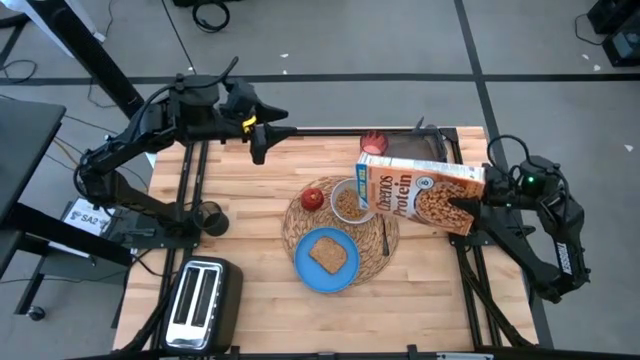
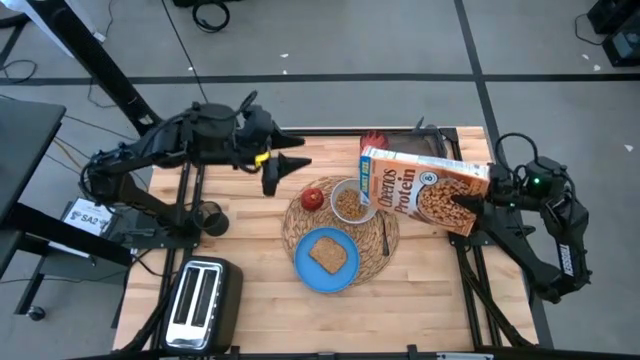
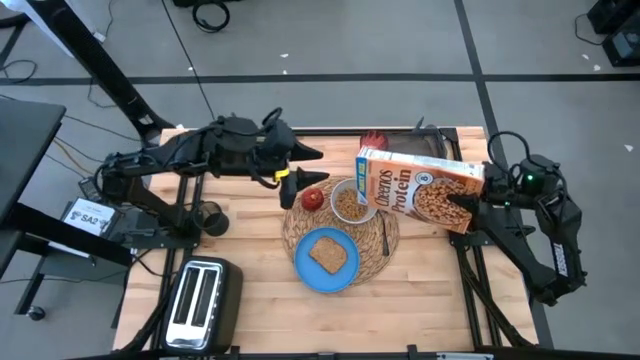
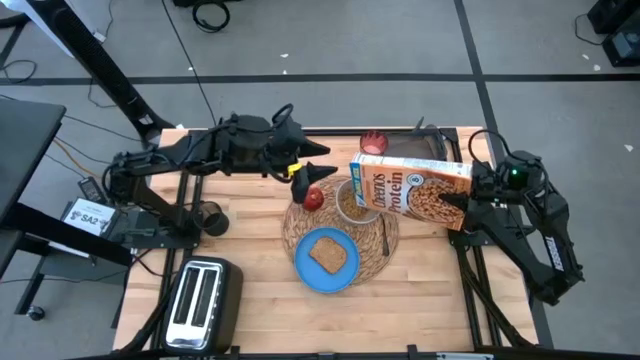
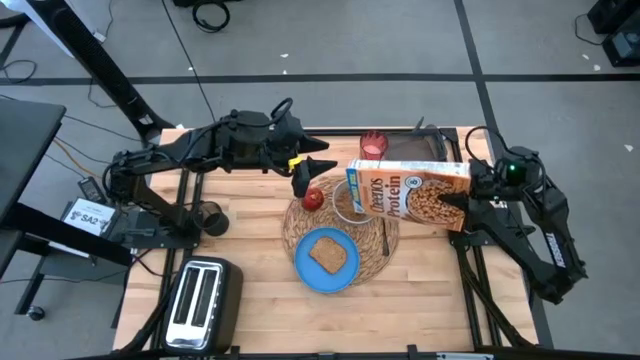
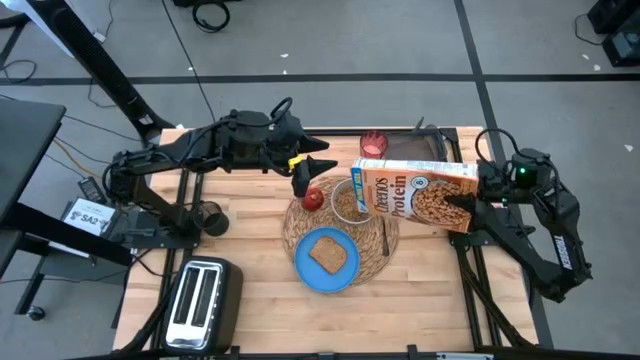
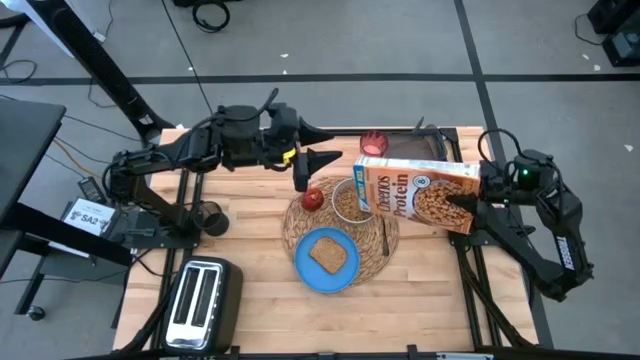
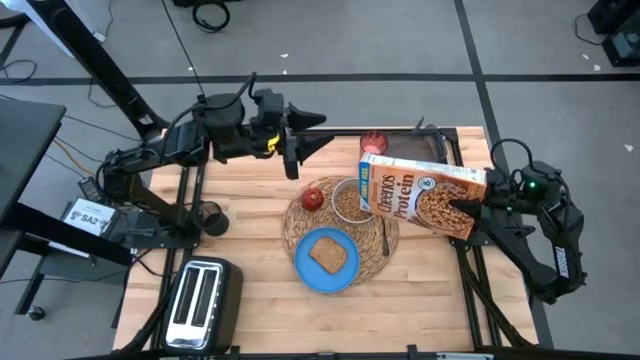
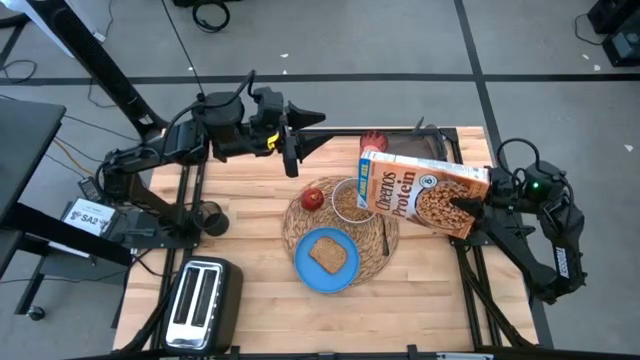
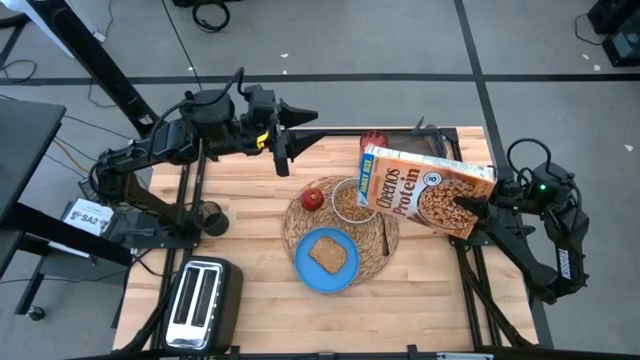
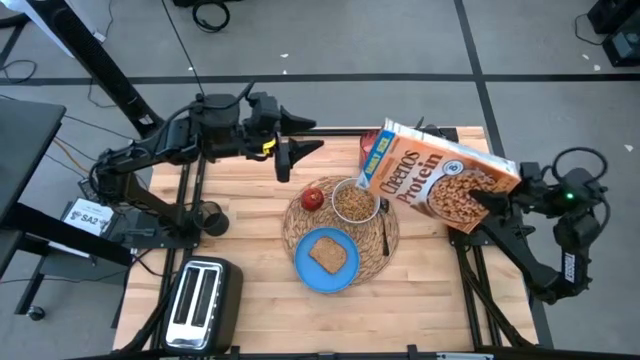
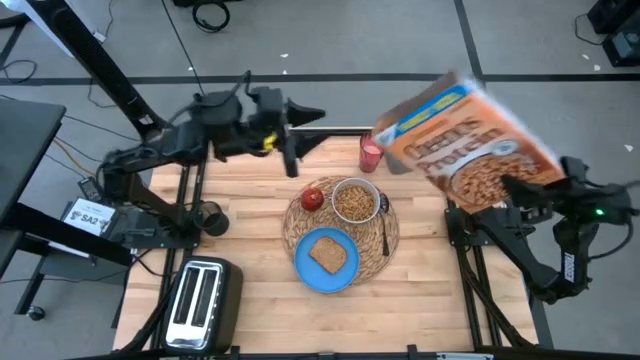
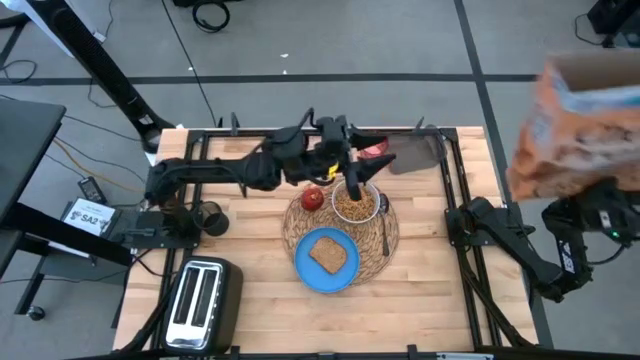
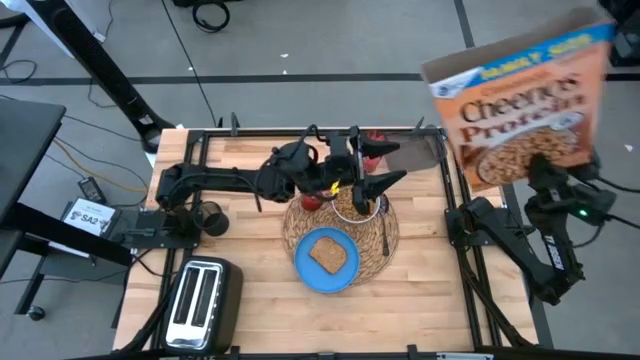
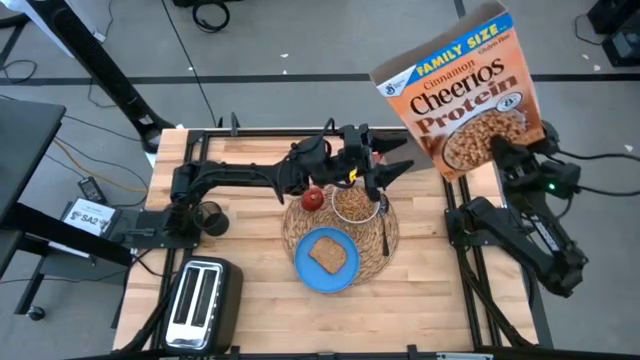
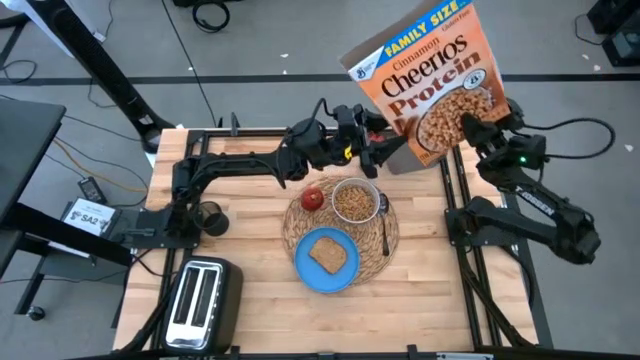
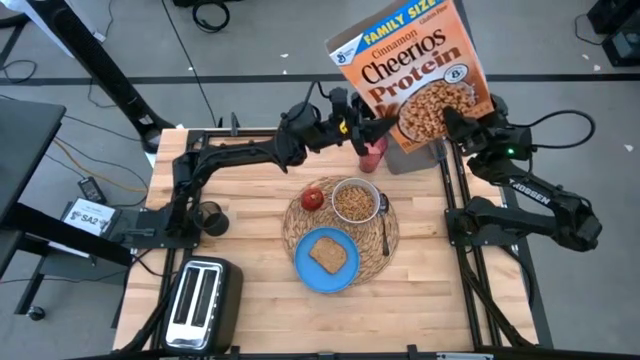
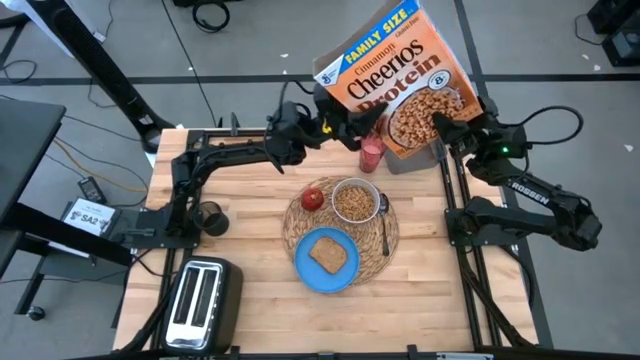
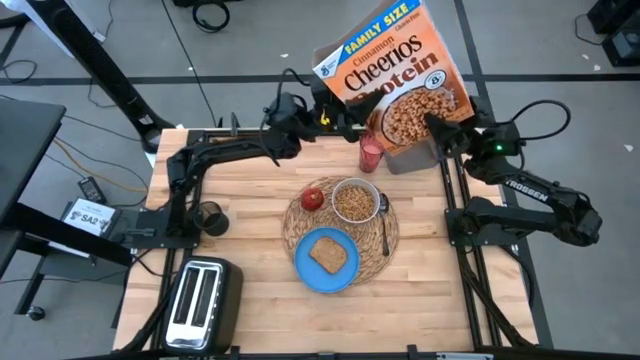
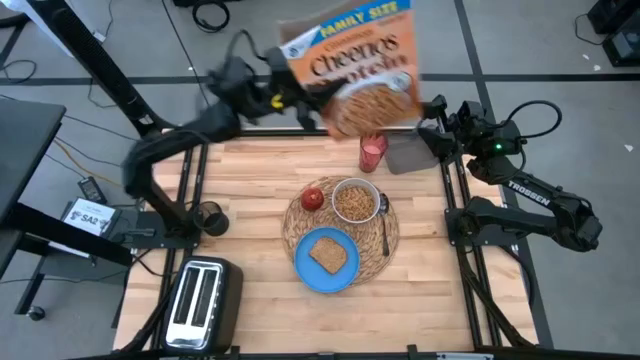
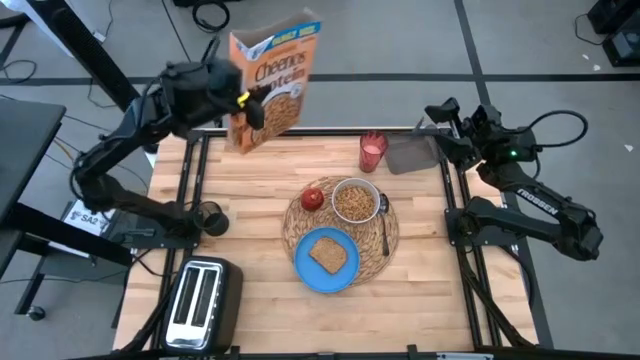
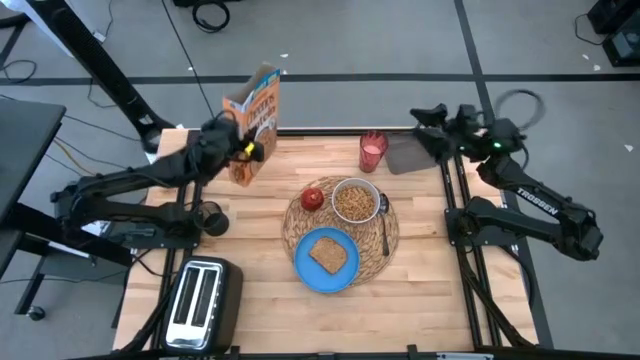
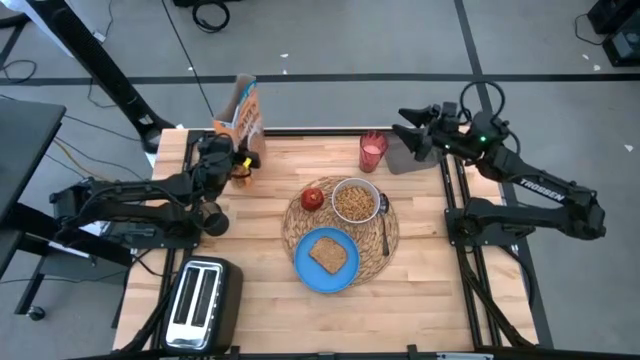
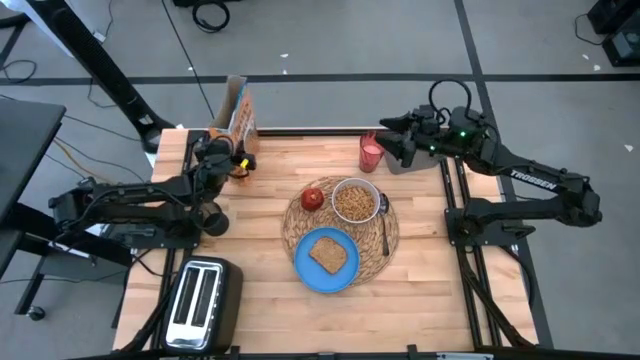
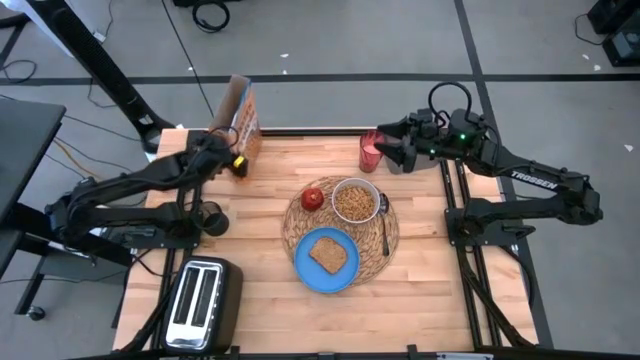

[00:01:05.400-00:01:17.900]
Task: Arrange a breakfast setting
Pour the cereals from the cereal box into the white bowl

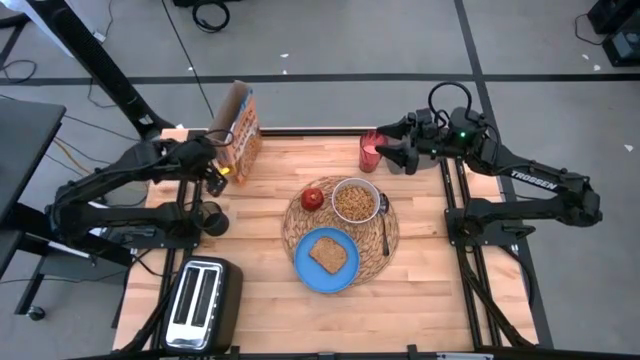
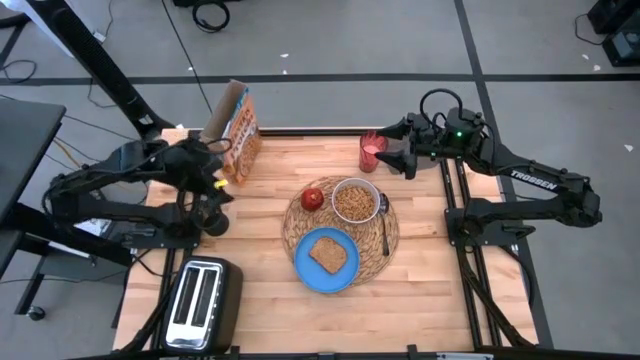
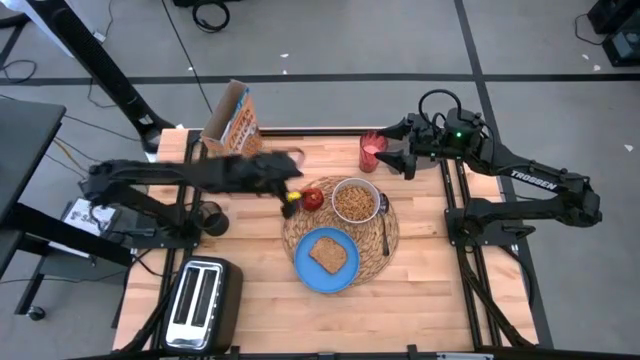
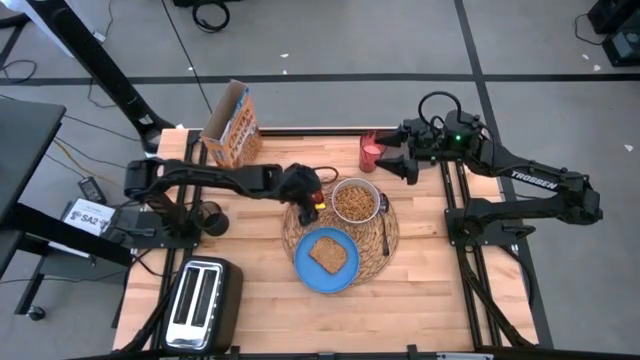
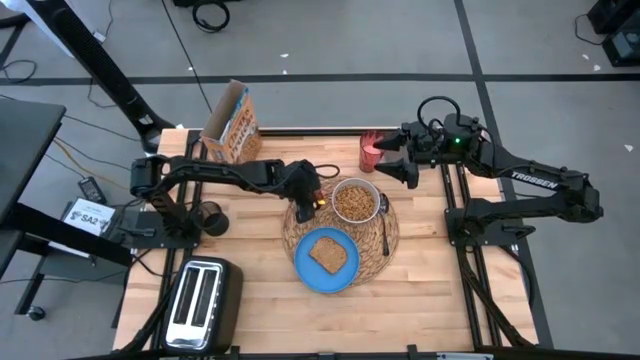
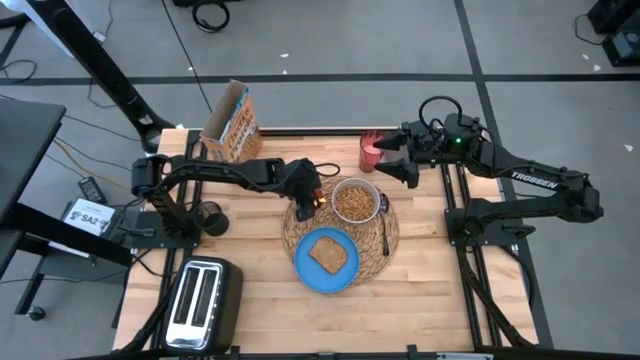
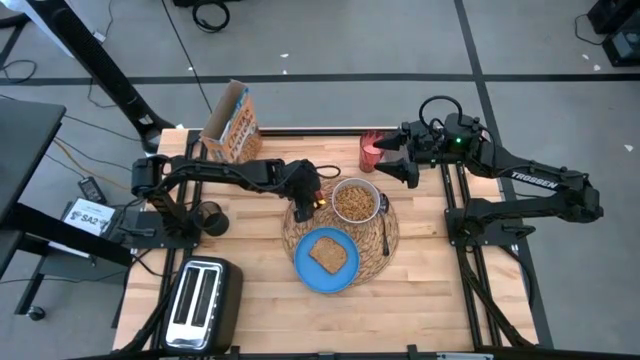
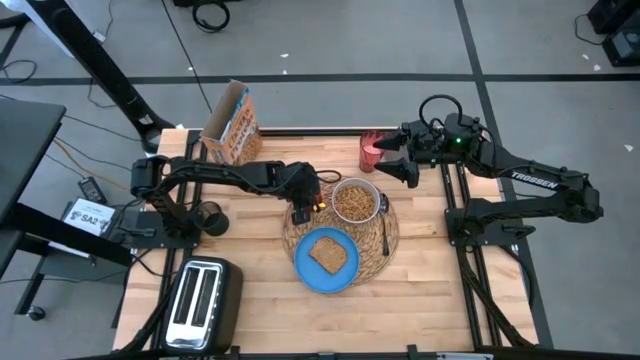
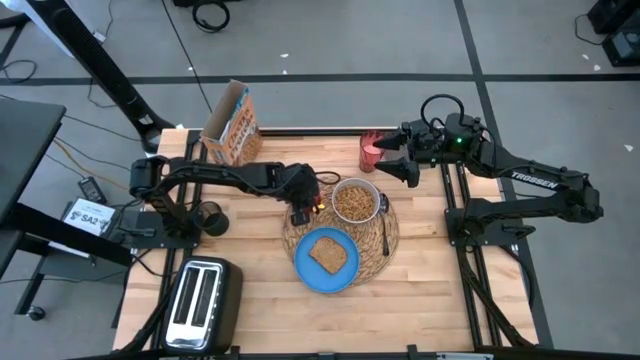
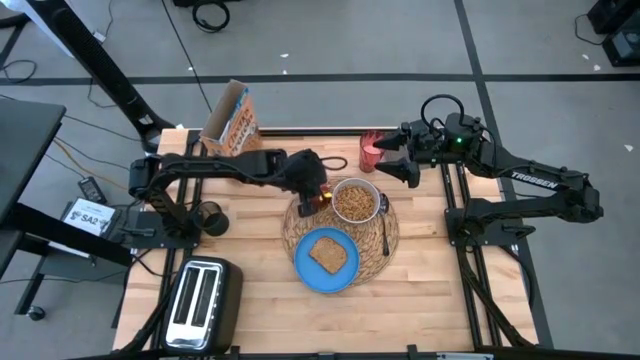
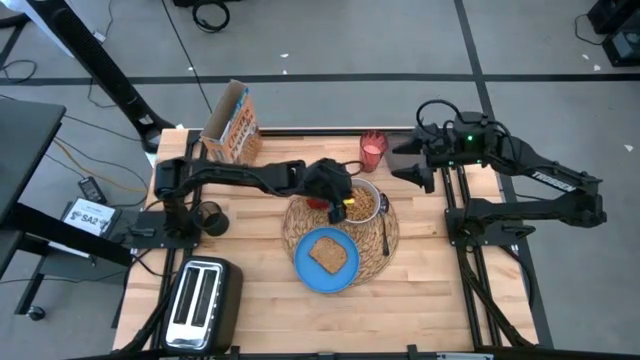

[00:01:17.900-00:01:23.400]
Move the cereal flakes on top of the apple to the white bowl

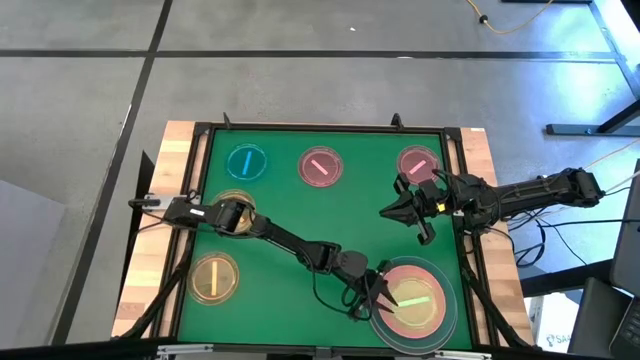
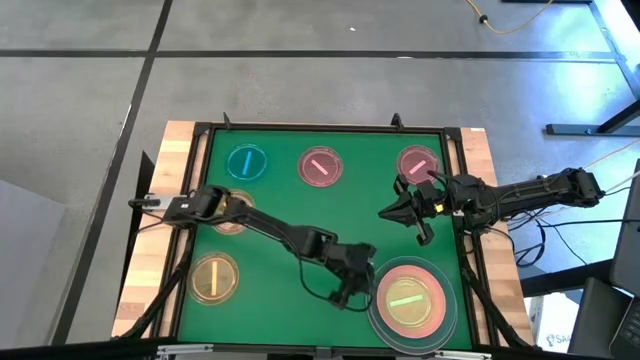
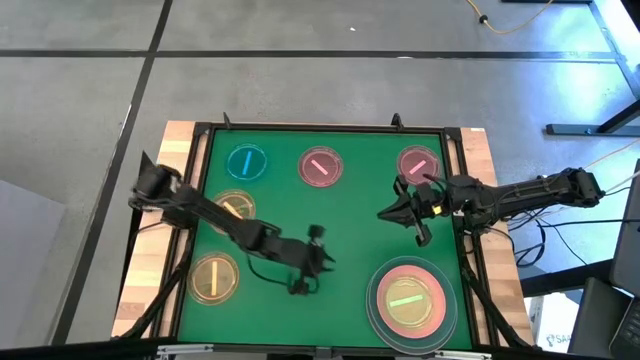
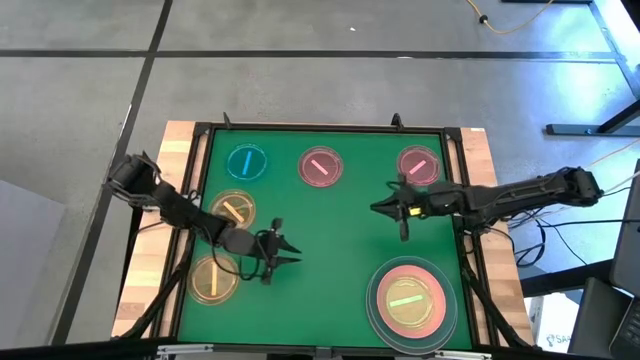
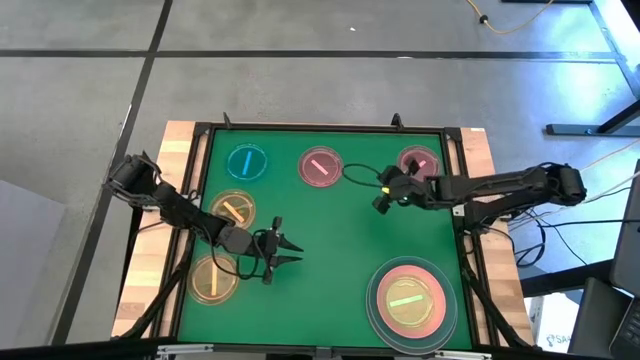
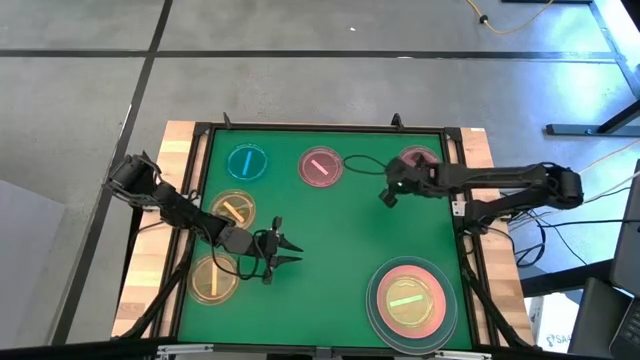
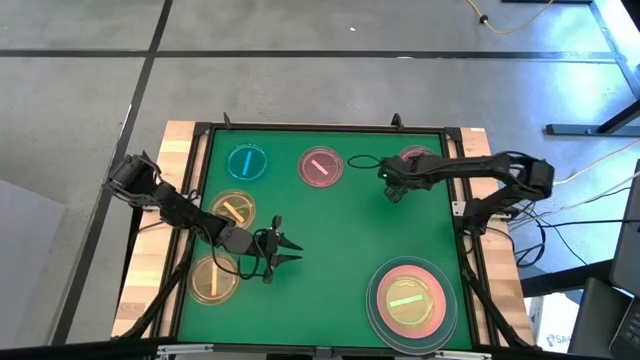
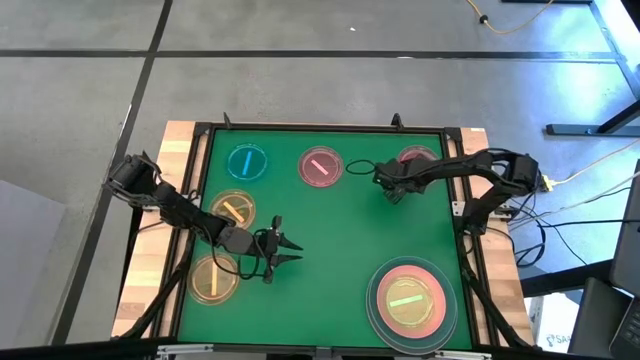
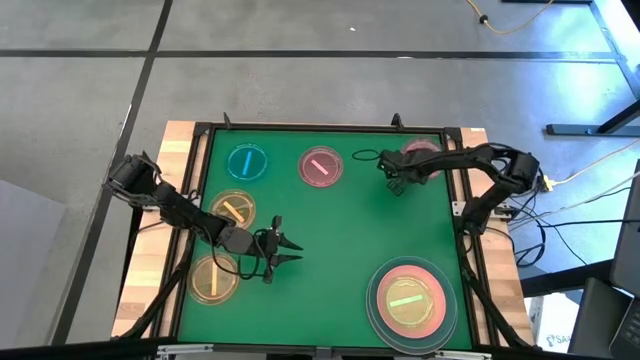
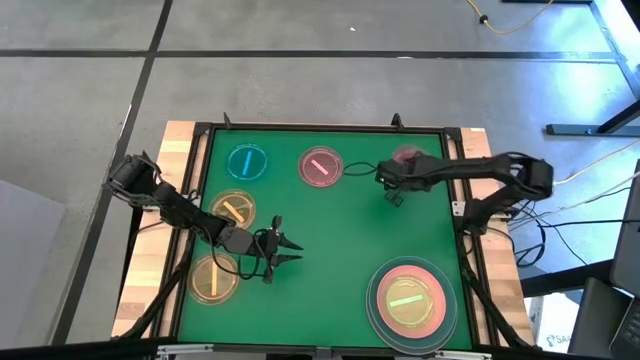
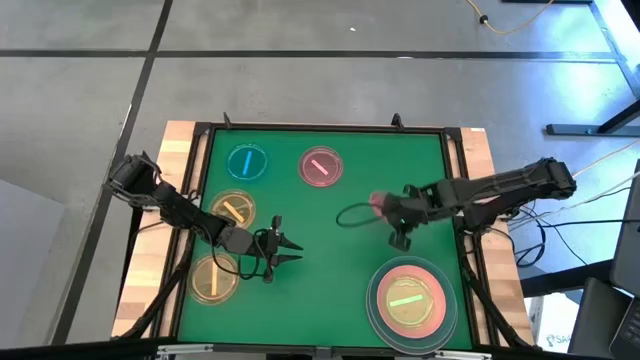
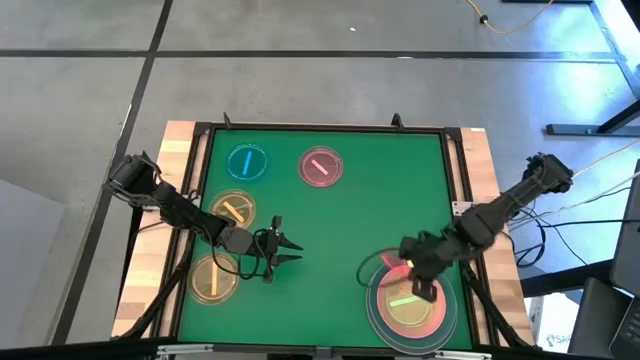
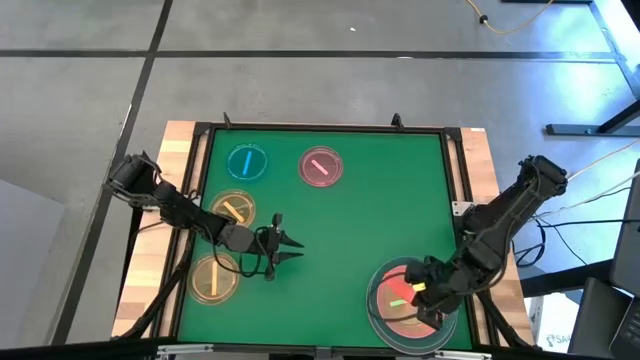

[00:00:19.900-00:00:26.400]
Task: Stack plastic plates
Stack the right transparent pink plate on top of the transparent green plate
